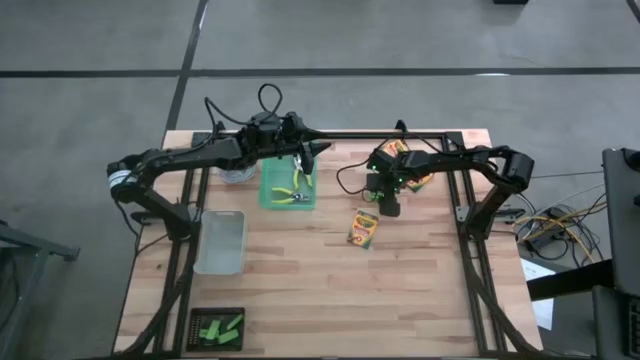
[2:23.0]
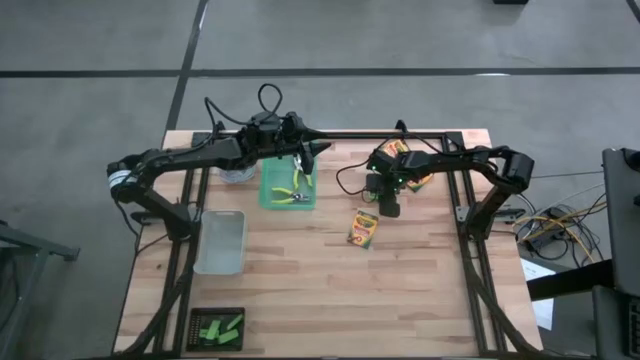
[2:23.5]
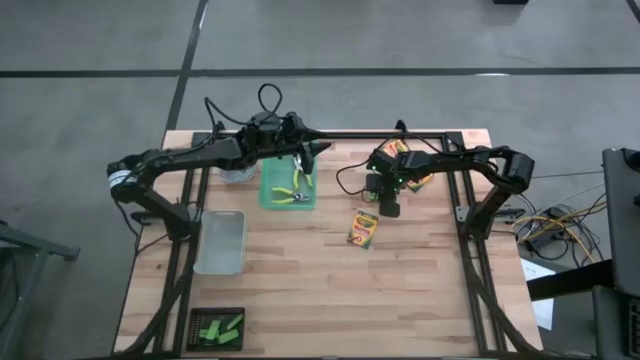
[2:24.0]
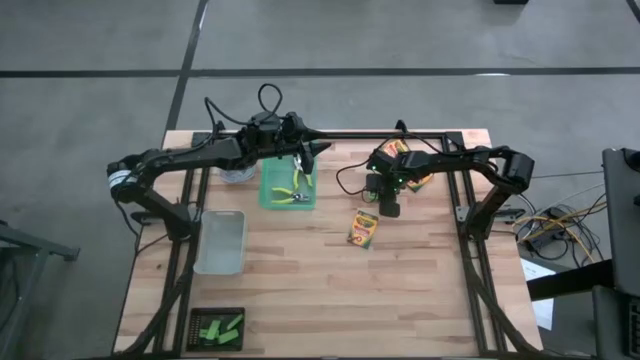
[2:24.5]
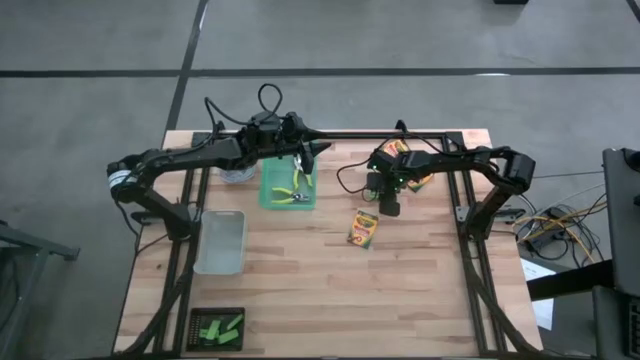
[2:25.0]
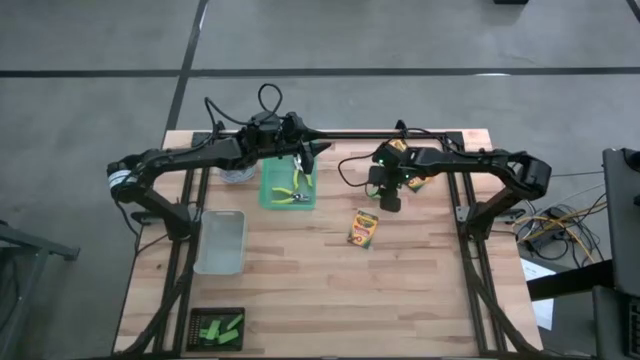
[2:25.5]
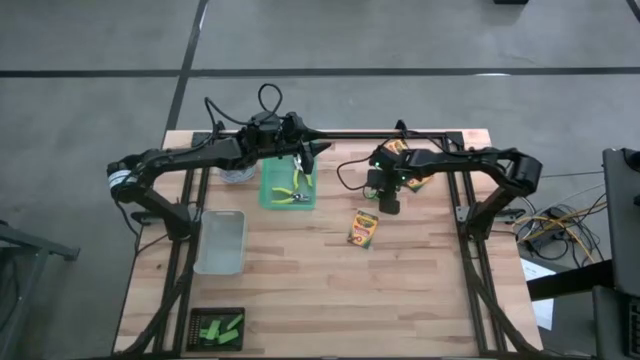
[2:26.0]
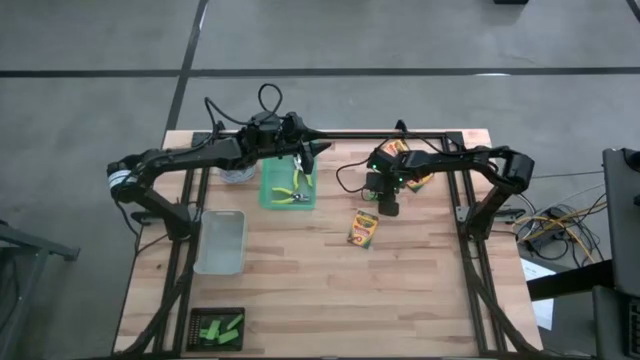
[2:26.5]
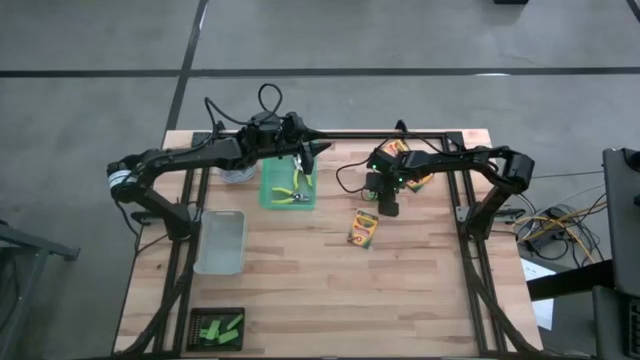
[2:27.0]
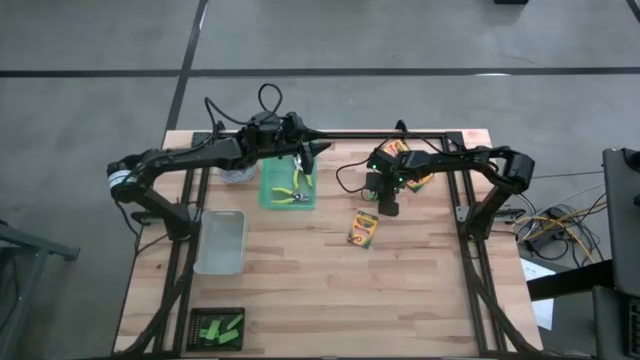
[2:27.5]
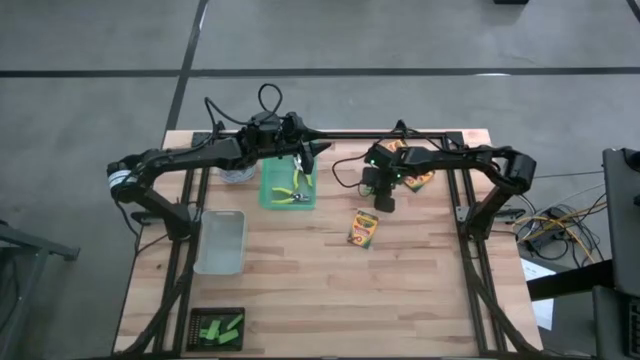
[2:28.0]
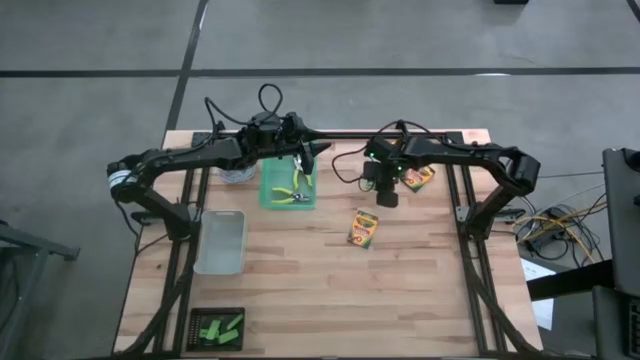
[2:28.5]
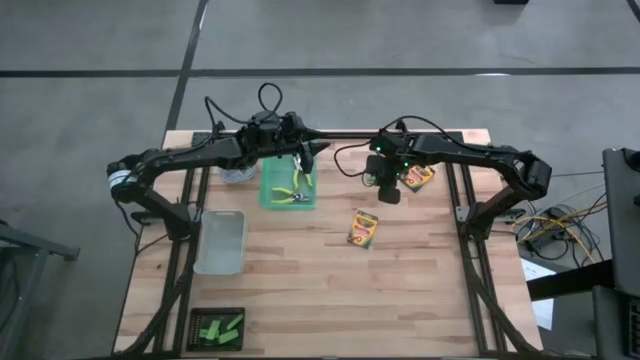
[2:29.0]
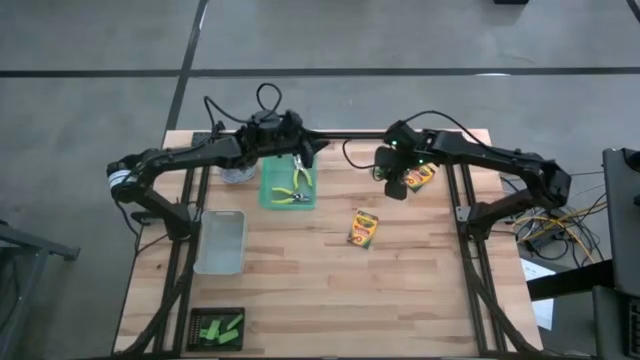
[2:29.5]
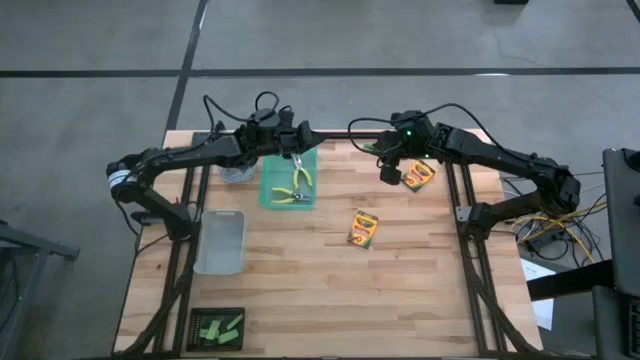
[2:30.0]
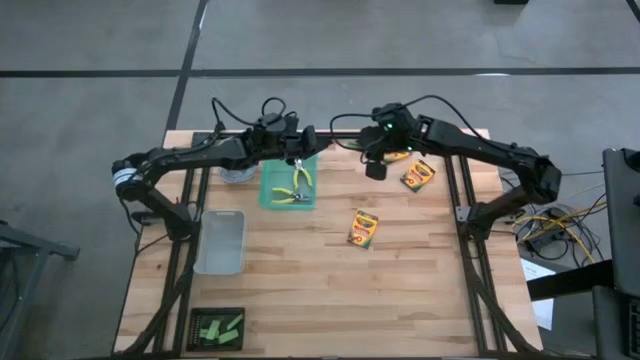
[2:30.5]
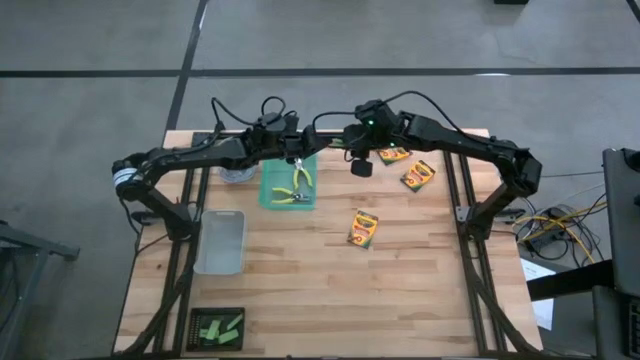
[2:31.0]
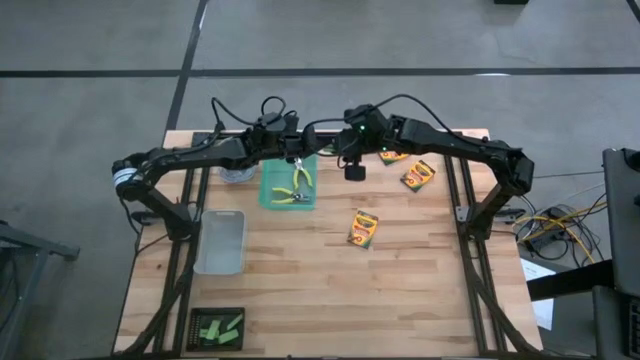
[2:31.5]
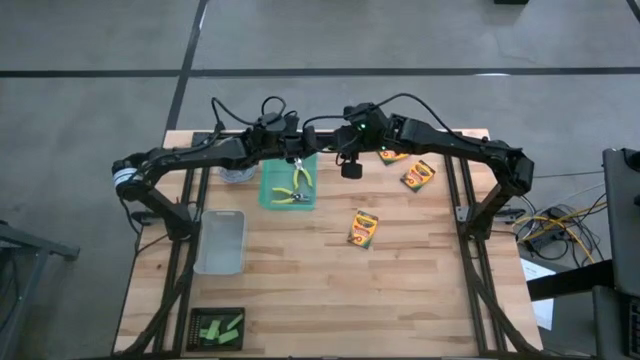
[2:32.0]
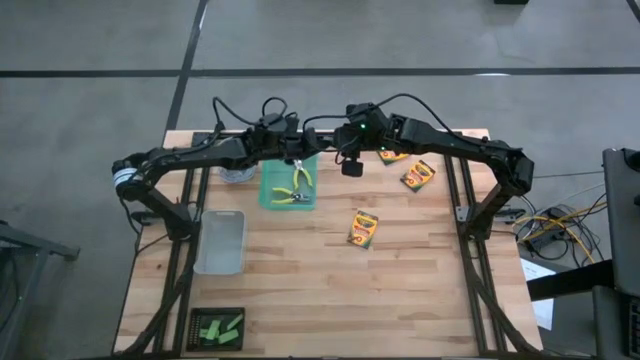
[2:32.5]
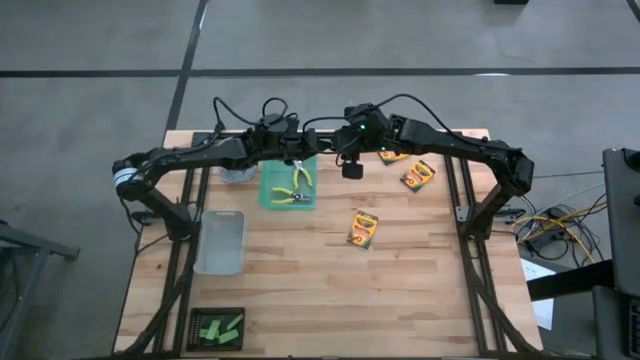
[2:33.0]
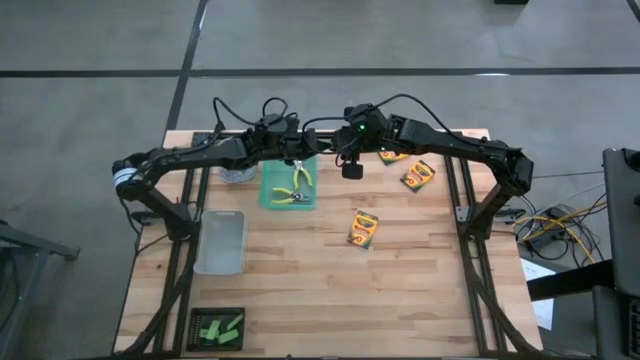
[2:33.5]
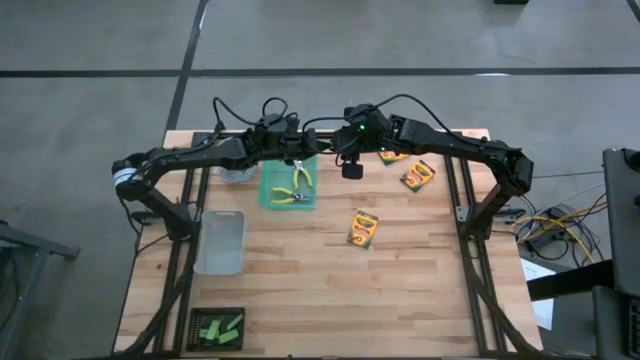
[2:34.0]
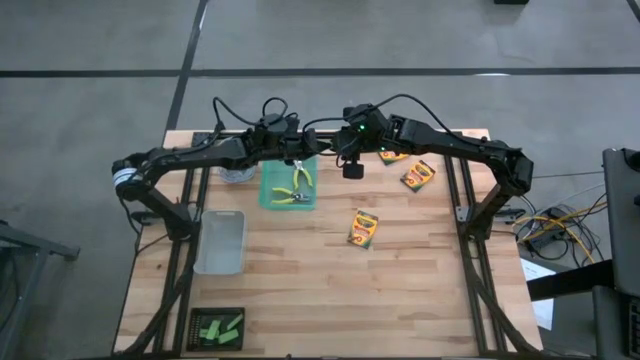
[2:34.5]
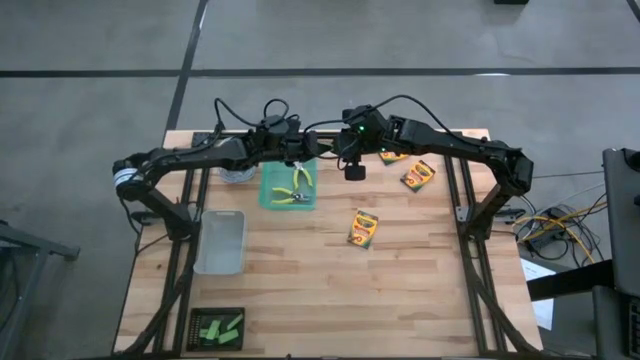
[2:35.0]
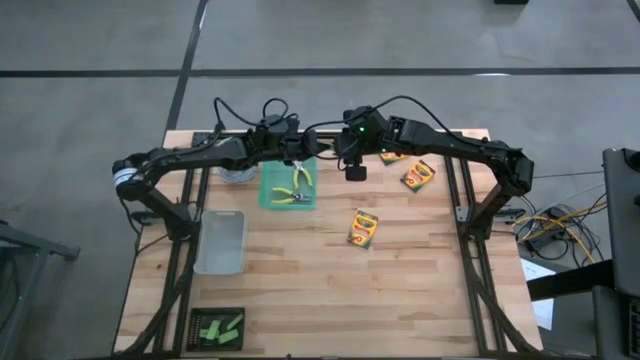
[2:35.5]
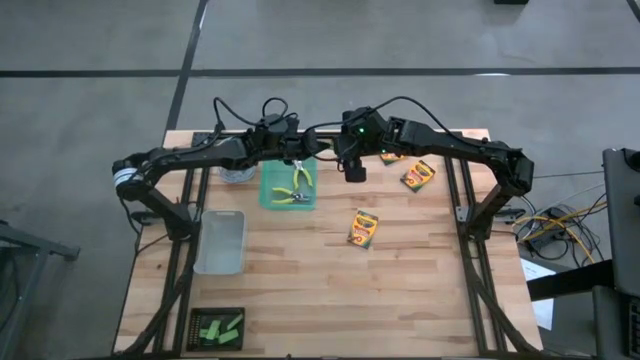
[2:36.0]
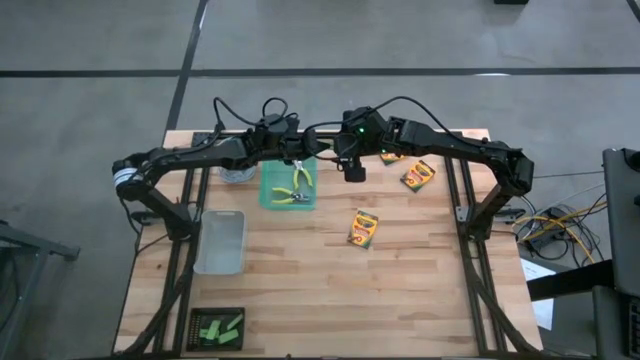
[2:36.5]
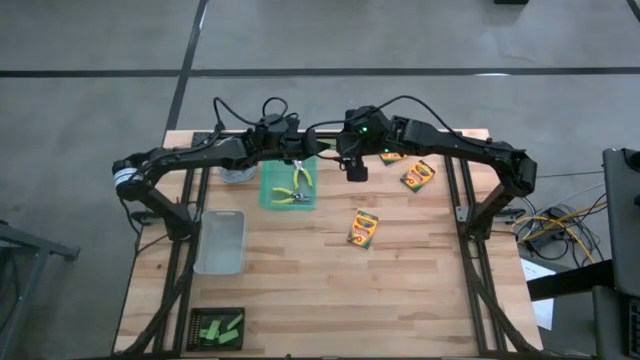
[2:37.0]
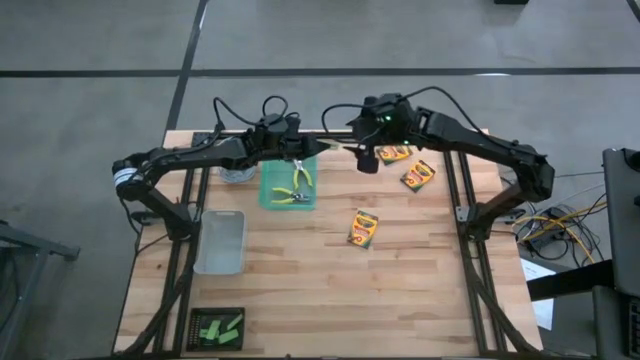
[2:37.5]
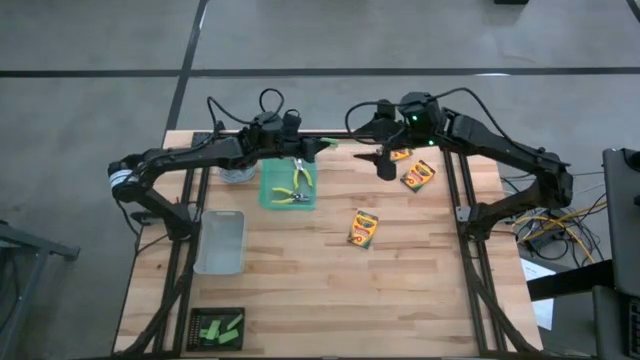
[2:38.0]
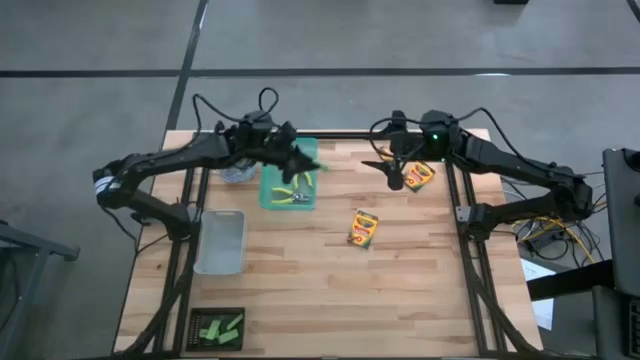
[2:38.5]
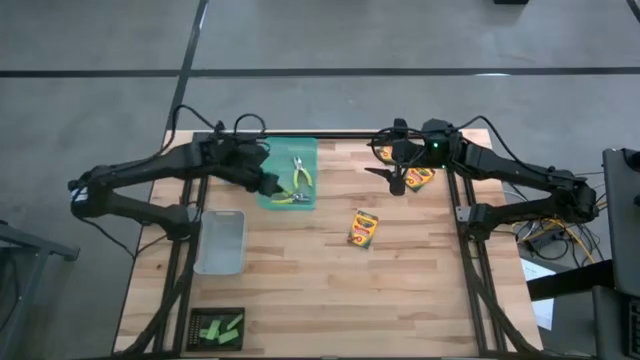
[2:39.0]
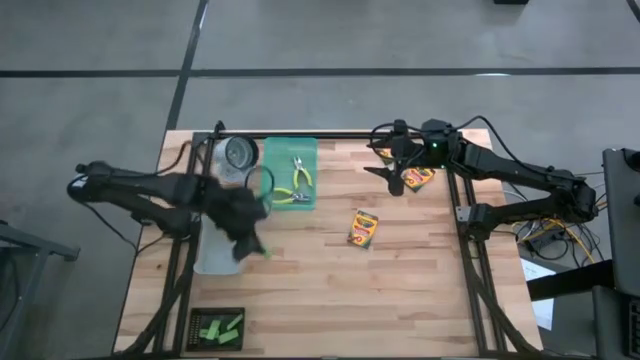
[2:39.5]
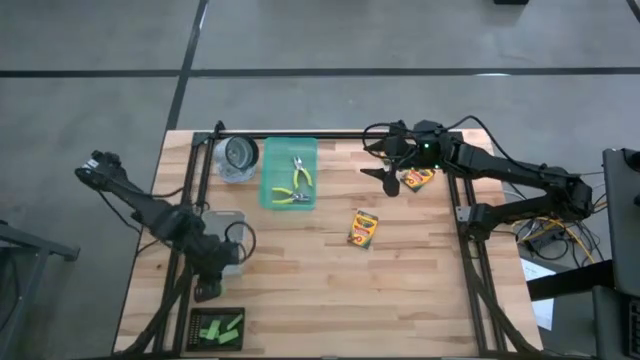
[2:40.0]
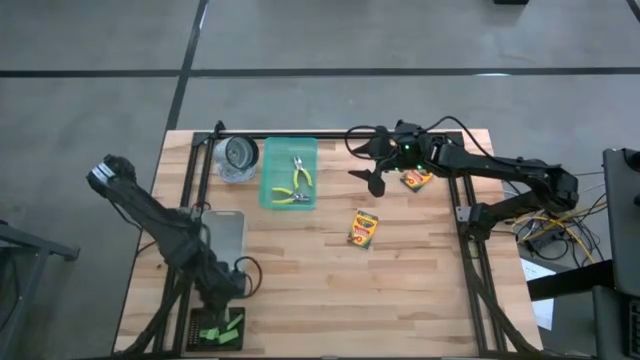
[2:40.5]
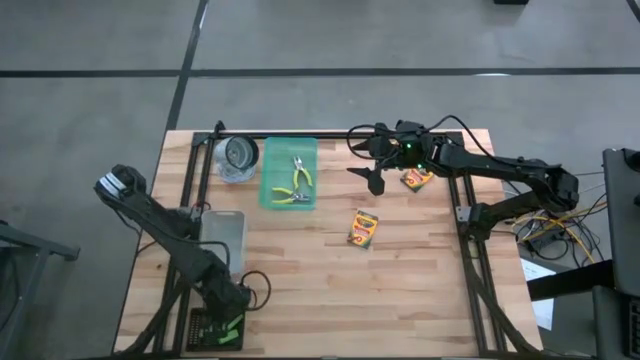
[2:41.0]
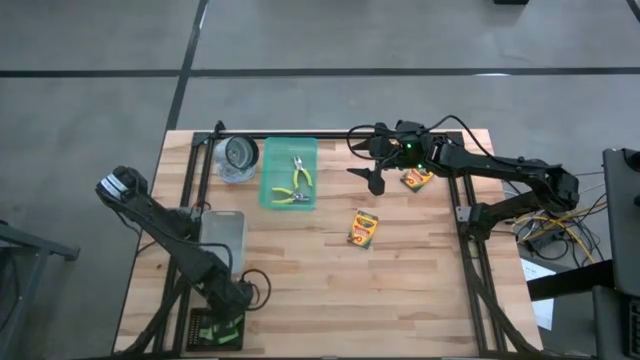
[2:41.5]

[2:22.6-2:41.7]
Task: Pick & Place School Supplies
Put the green eraser into the black bin

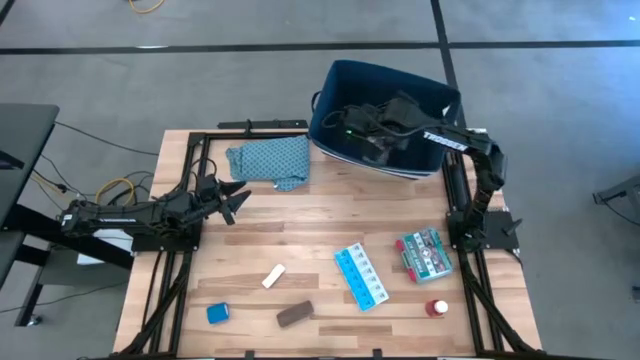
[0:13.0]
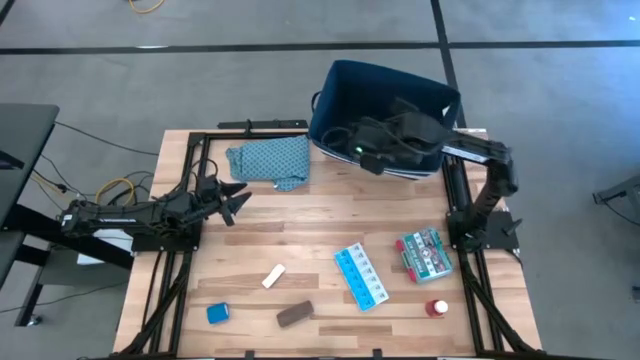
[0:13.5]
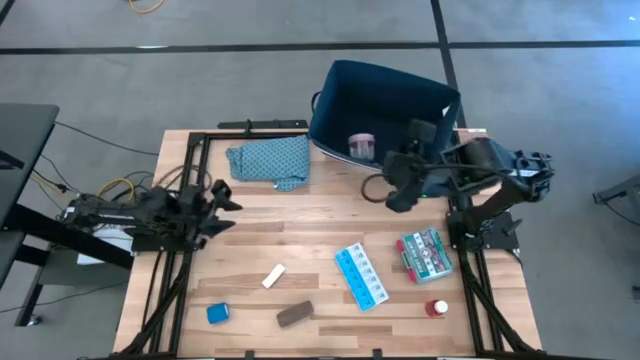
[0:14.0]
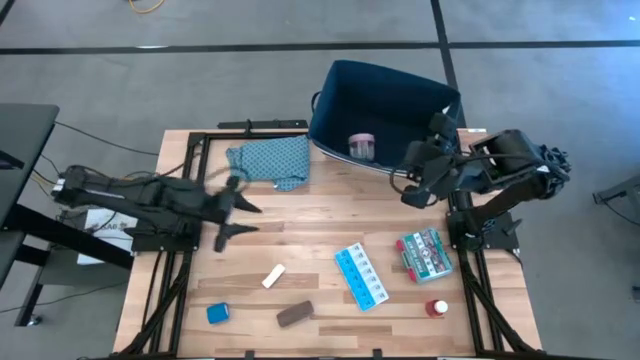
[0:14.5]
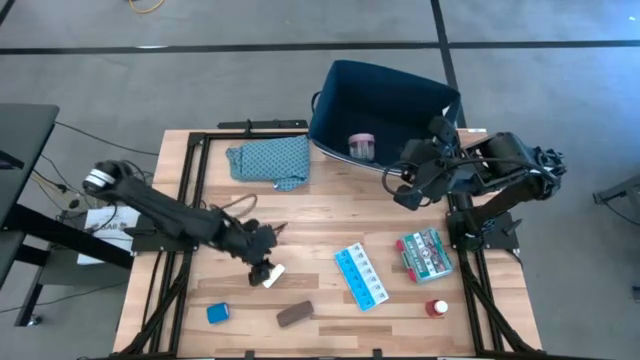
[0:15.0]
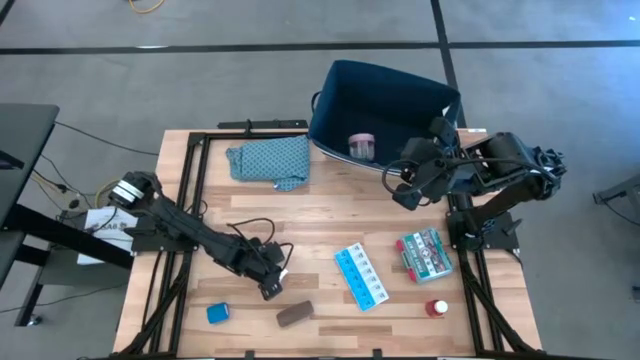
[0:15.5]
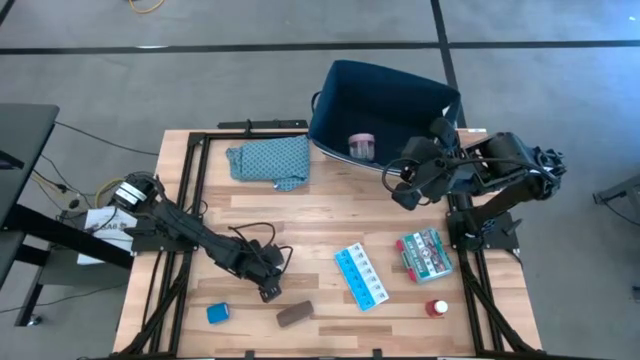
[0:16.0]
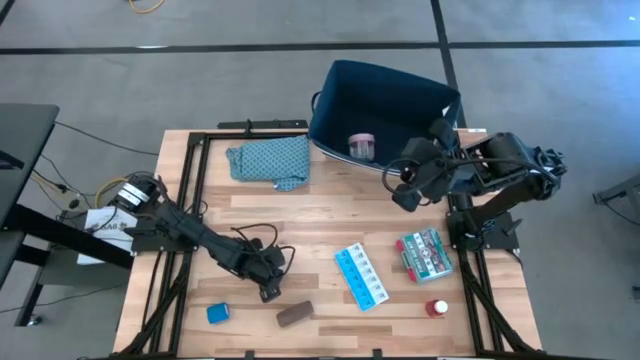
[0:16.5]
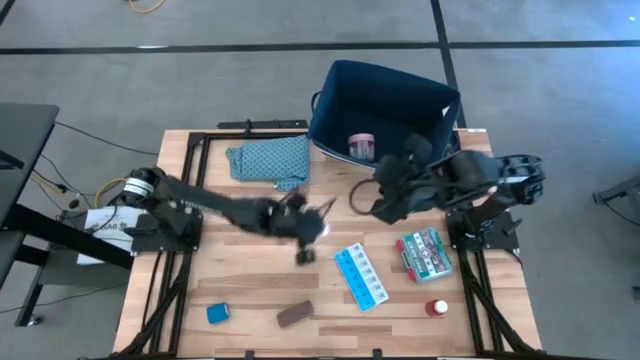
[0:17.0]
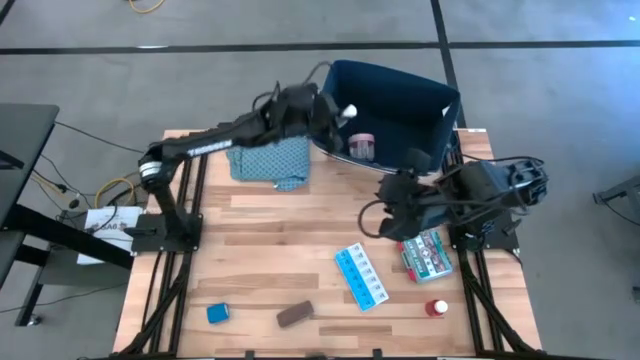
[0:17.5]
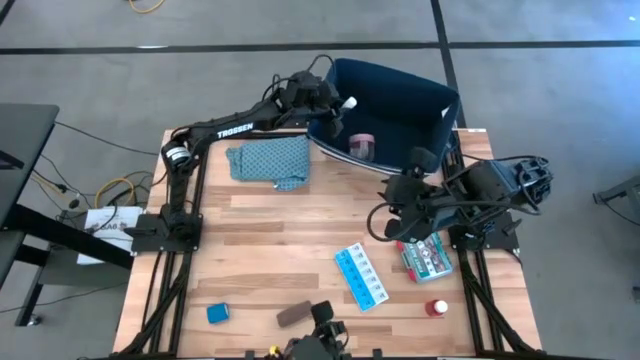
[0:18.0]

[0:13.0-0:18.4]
Task: Pick & place medical supplies in basket/bin
Put the white gauze into the blue bin
